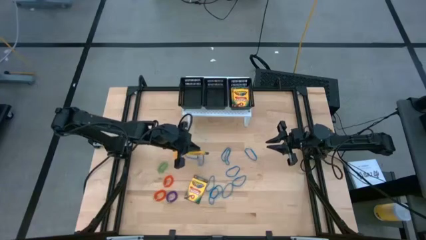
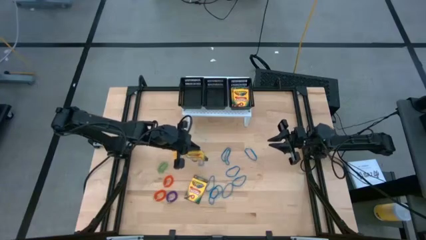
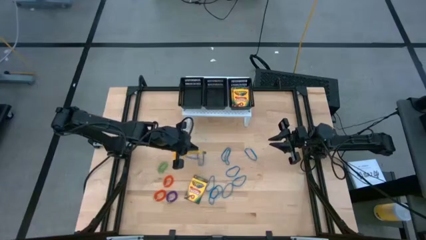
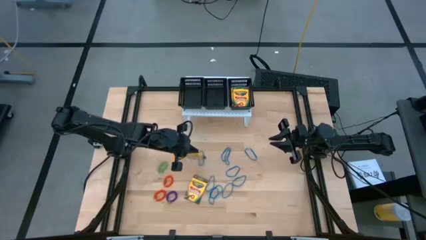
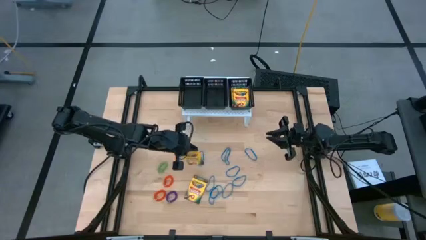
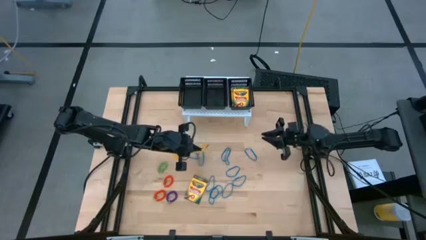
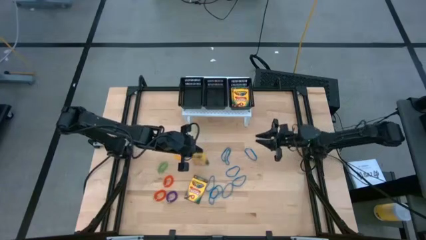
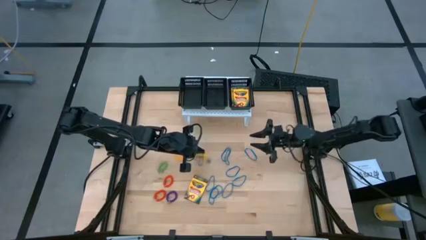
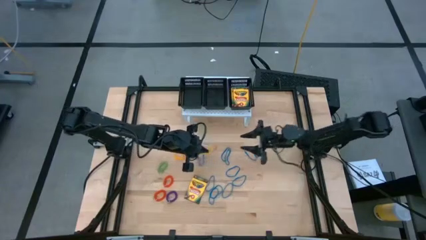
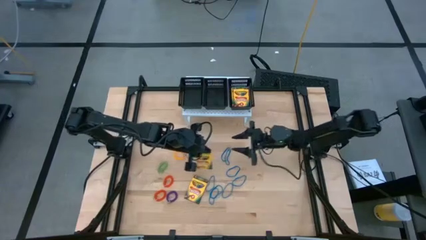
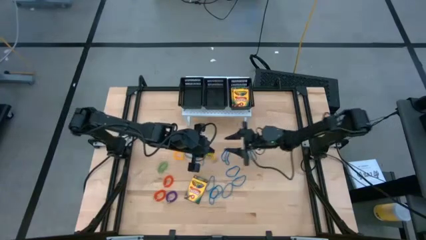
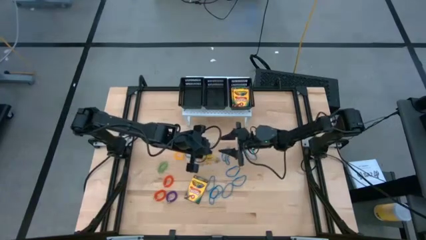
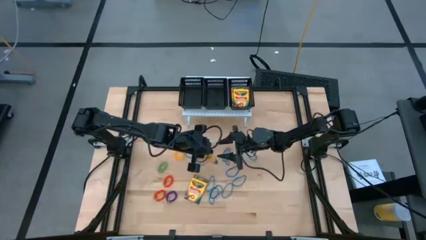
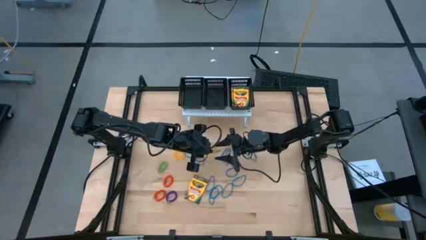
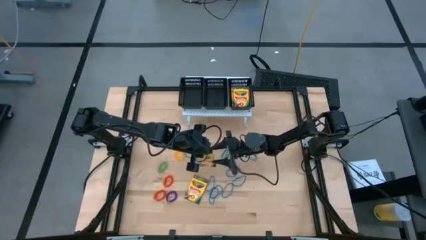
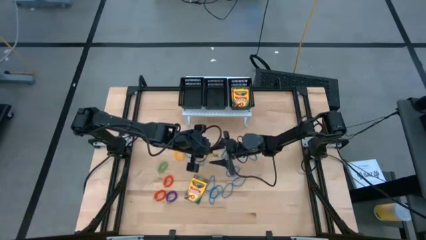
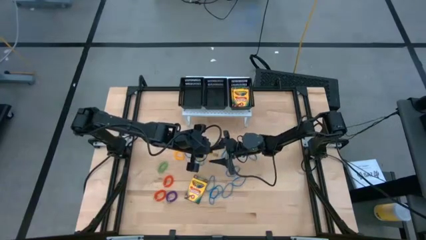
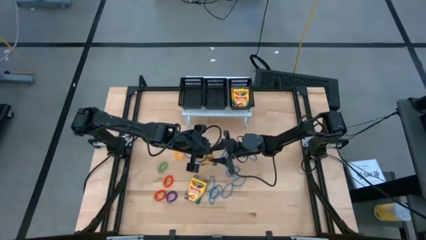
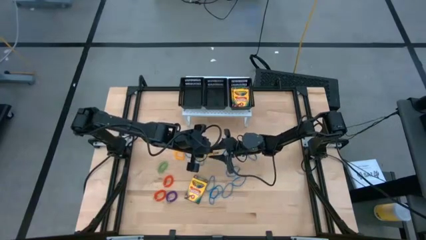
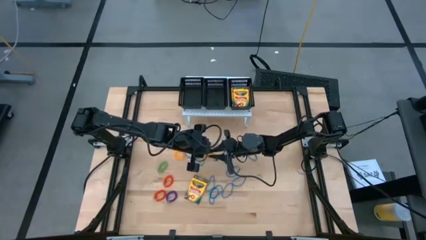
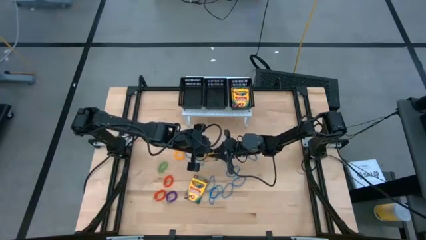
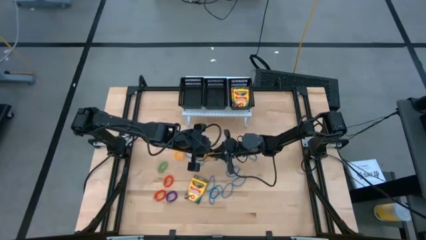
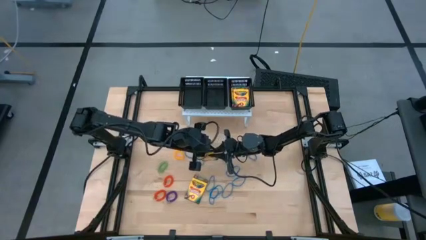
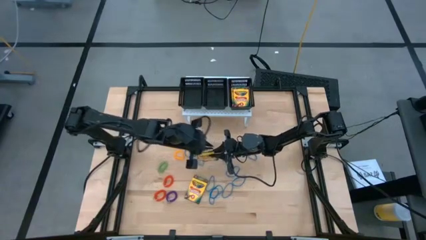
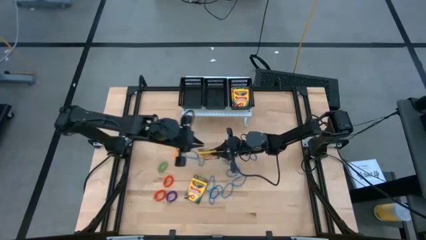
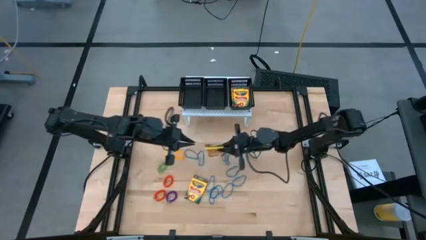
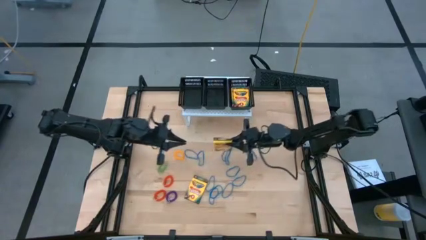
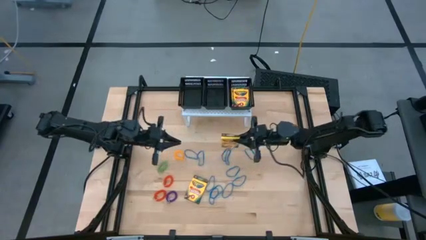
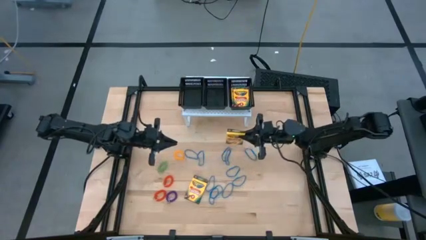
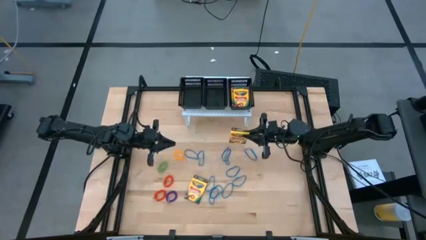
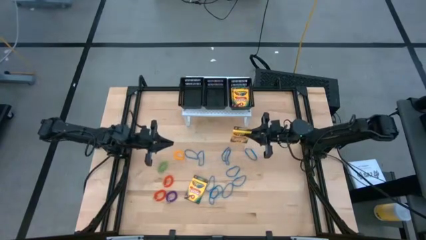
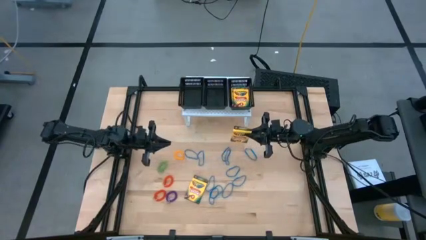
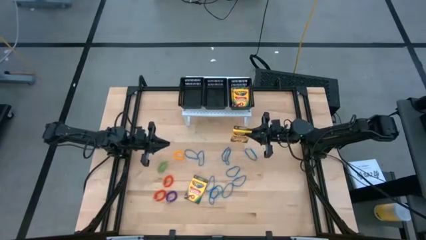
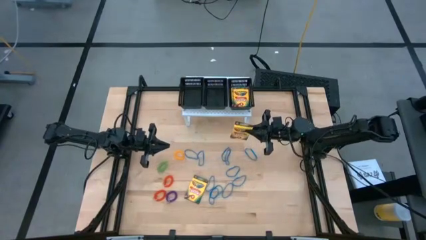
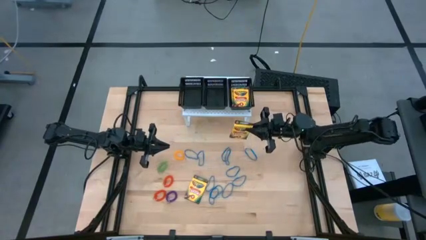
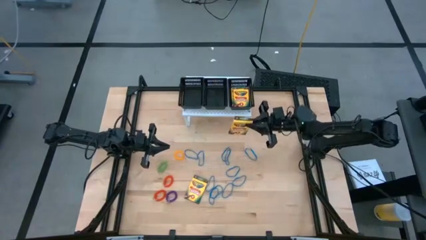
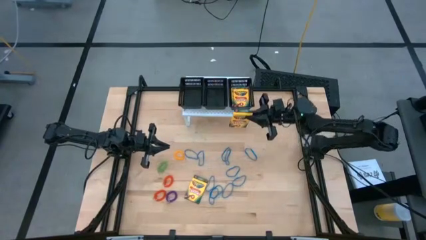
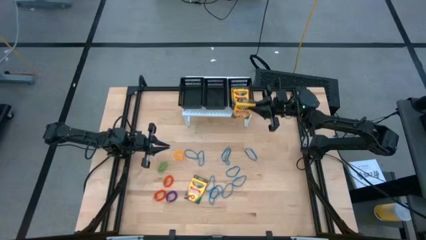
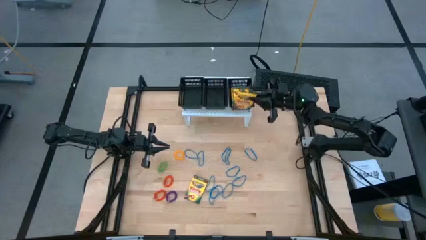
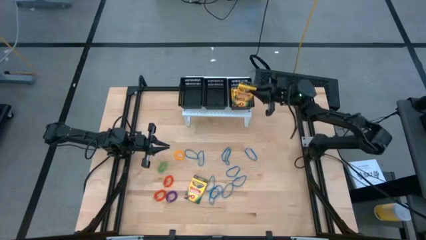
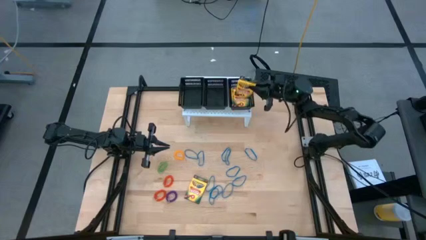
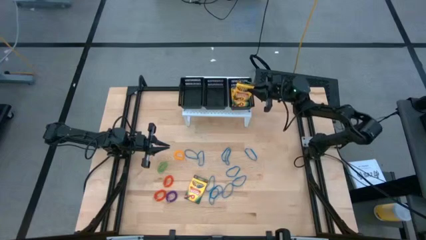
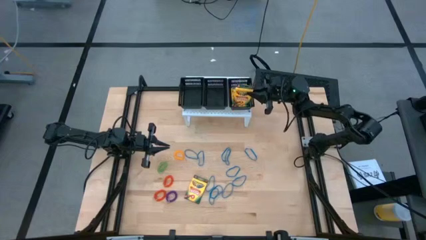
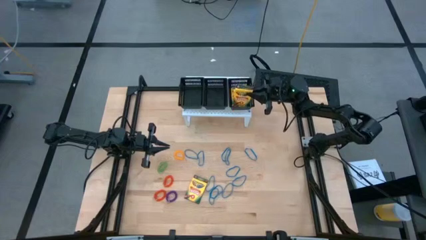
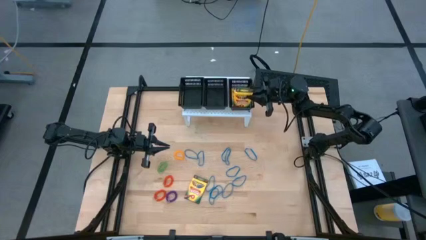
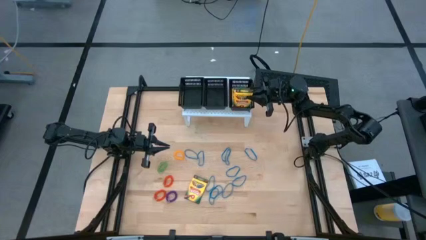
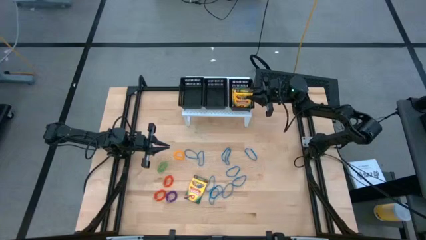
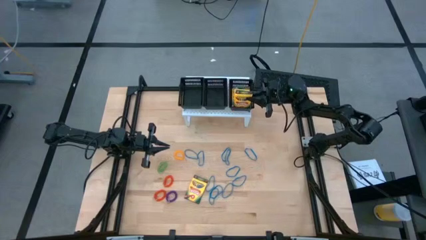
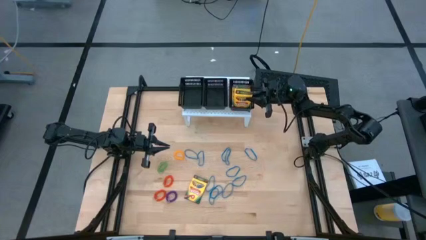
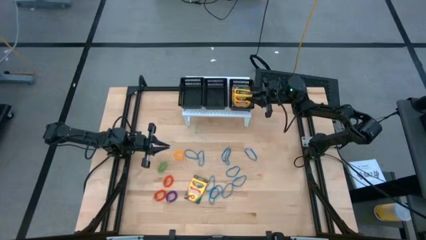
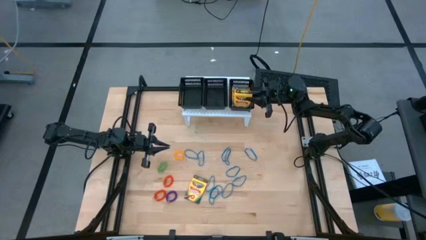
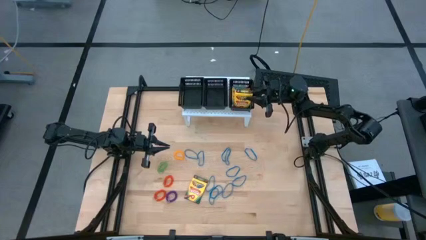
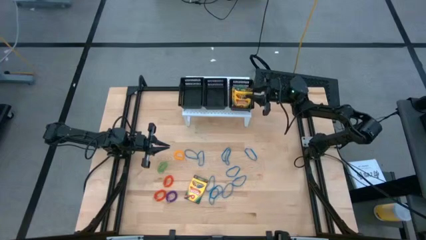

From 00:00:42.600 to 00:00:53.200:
Task: Pick & Place Office Desk Supplies
Put the crayon box into the right black bin
